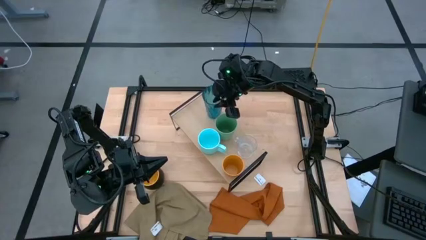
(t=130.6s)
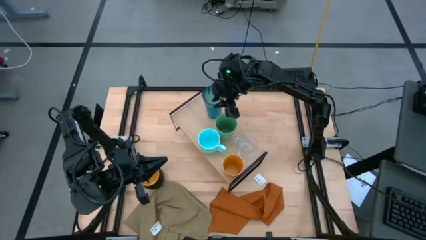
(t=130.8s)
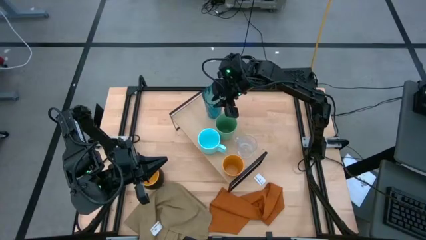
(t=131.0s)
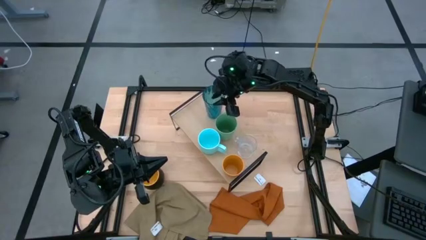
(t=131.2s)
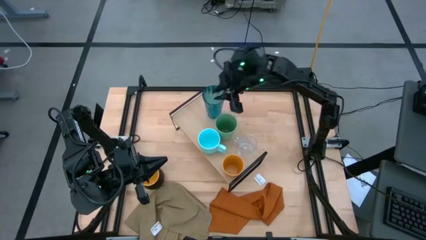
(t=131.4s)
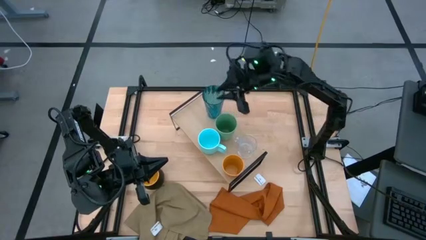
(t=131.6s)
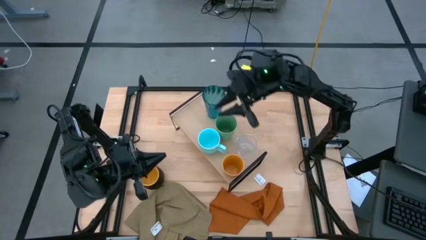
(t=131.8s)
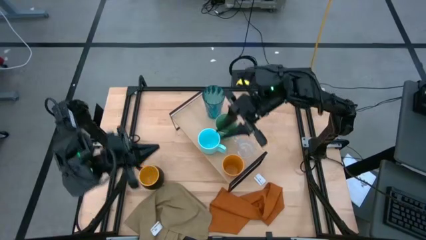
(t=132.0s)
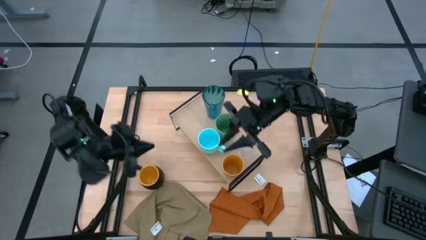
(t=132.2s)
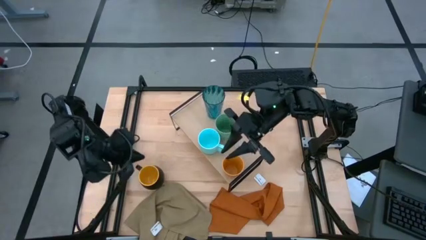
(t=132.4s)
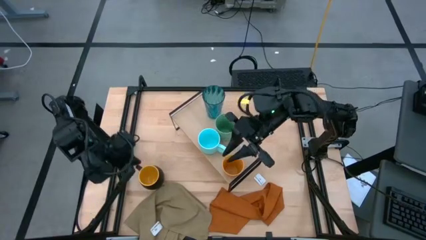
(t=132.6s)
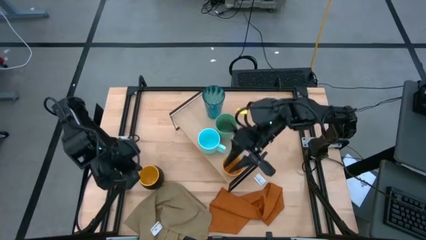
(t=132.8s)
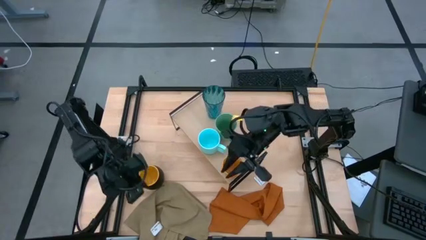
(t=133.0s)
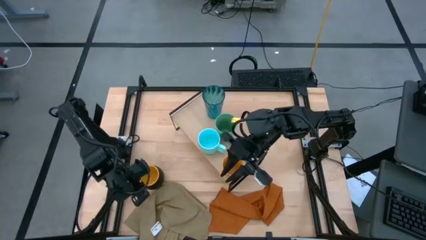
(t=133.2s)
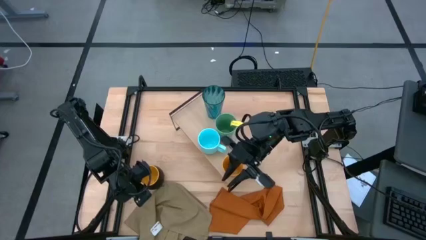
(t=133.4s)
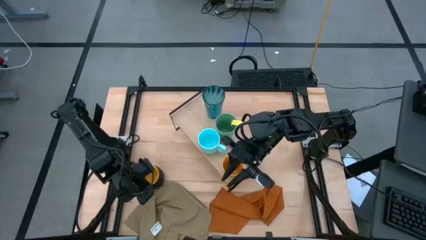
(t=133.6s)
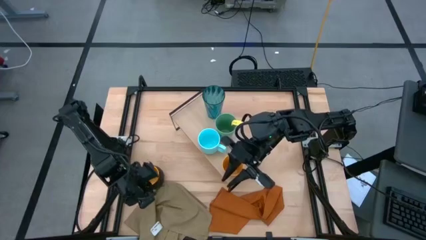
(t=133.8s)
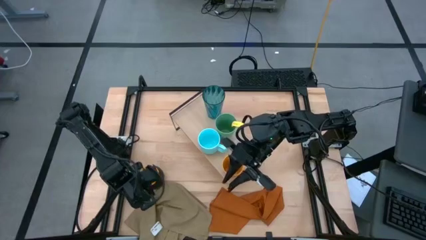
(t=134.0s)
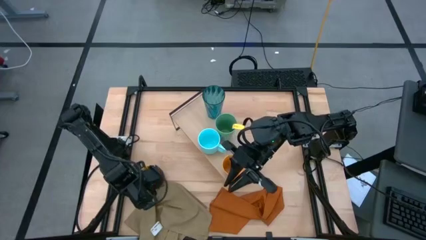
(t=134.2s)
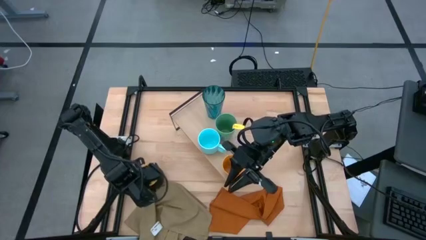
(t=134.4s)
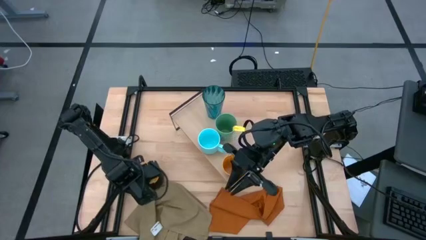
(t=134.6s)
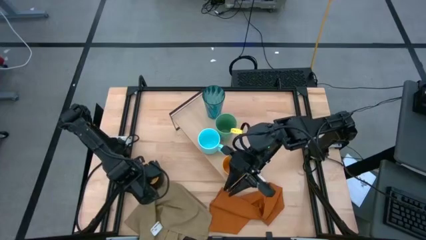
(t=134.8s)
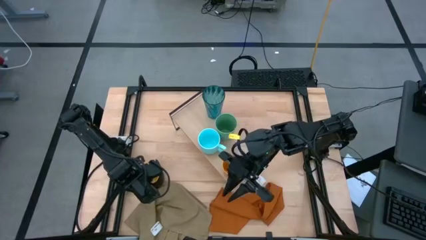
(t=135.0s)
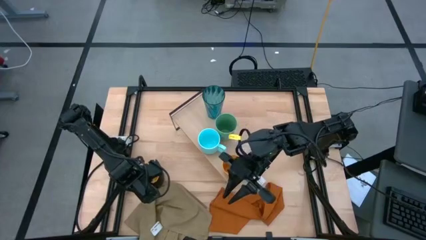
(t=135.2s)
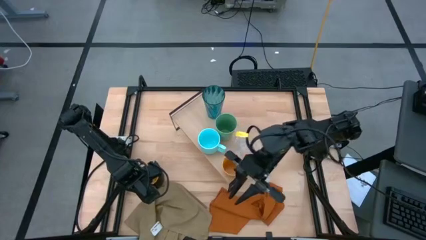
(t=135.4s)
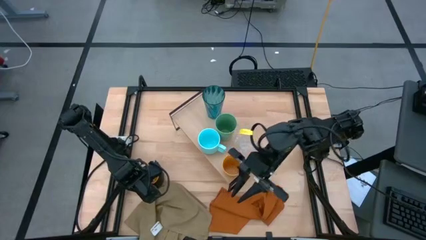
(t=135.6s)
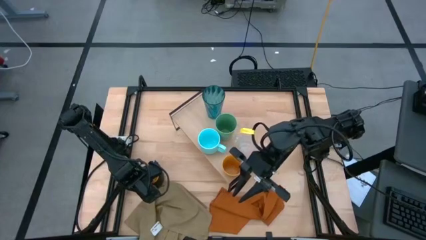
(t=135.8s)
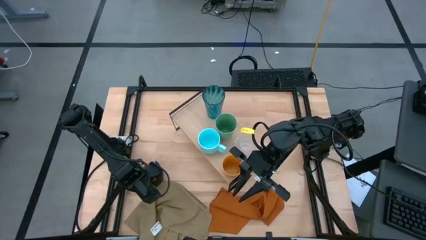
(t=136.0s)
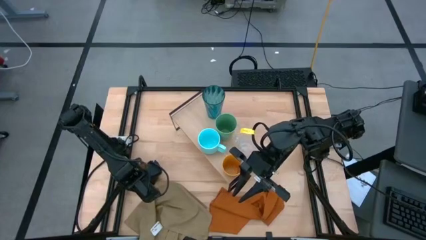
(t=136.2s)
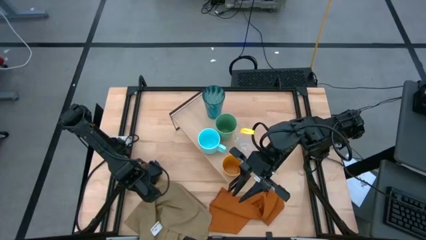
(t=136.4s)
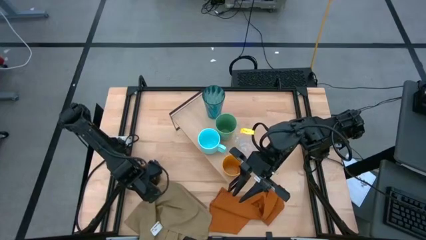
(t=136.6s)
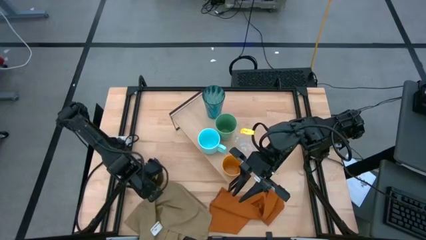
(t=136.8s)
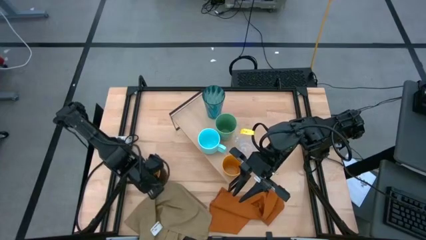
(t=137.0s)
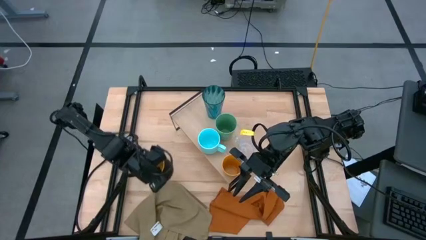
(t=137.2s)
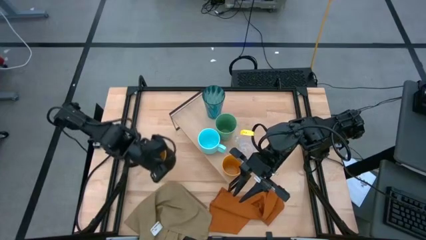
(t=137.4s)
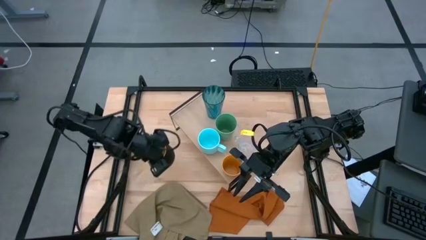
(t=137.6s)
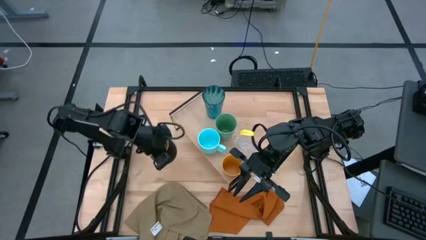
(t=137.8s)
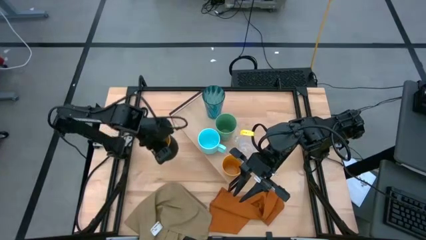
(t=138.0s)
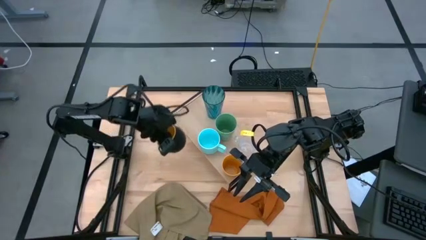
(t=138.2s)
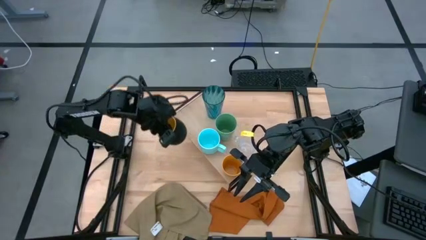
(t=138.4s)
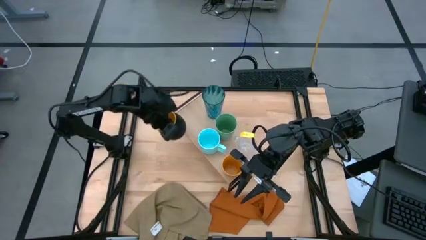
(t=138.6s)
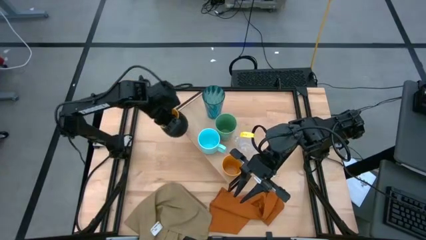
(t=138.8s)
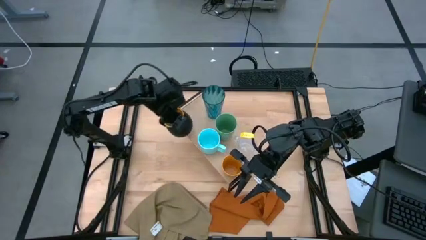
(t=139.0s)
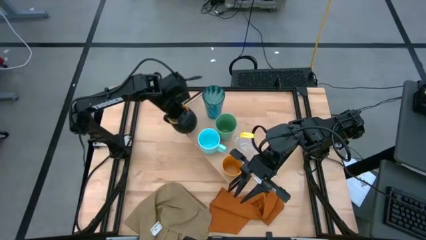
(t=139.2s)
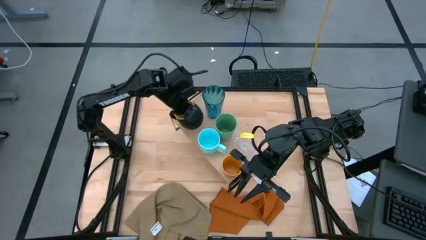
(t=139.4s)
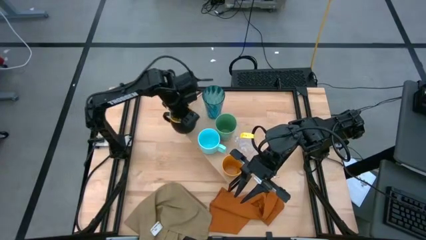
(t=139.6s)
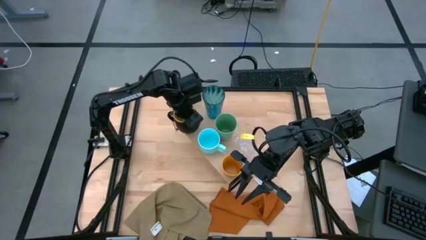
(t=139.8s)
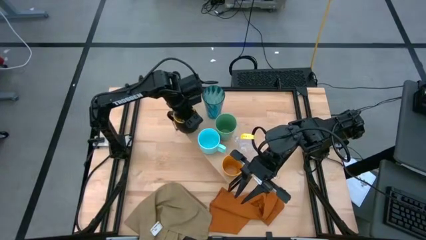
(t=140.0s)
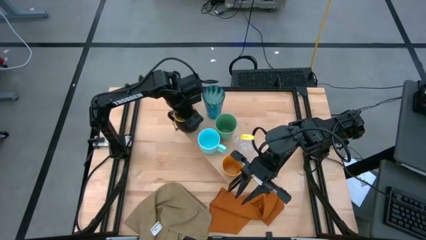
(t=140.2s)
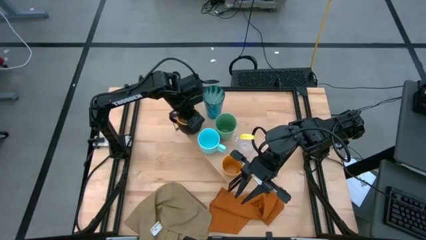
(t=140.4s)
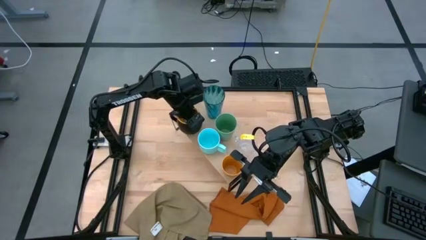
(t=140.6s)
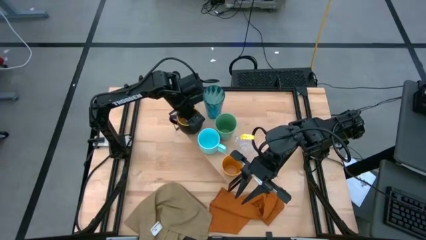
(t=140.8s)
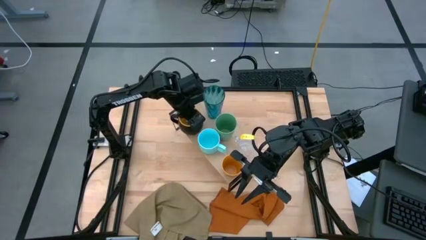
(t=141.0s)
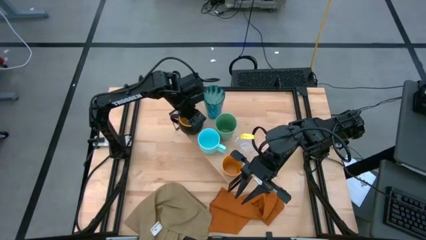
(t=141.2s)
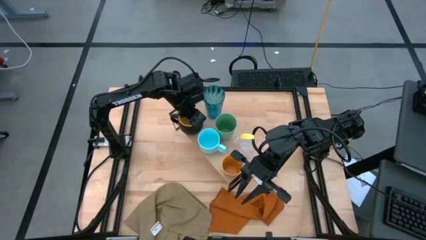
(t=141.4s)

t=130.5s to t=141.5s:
Task: Stack small to large cups/mugs on shelf
Put the black cup on the shelf

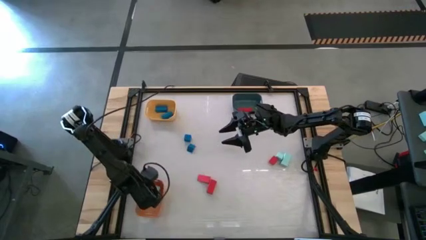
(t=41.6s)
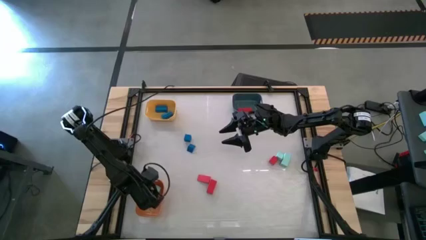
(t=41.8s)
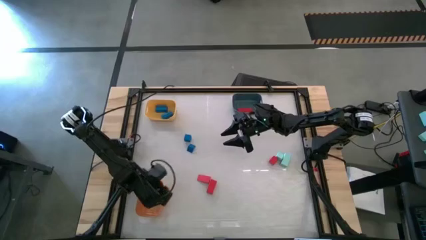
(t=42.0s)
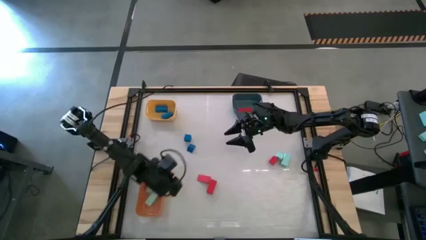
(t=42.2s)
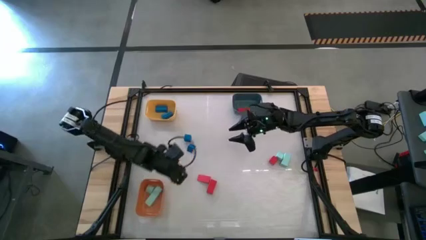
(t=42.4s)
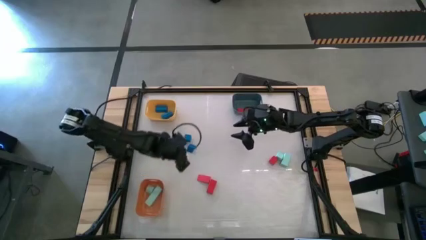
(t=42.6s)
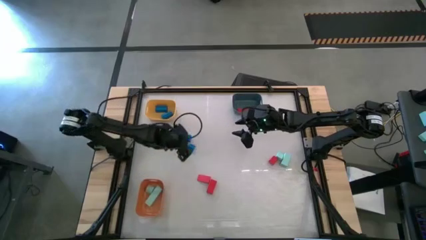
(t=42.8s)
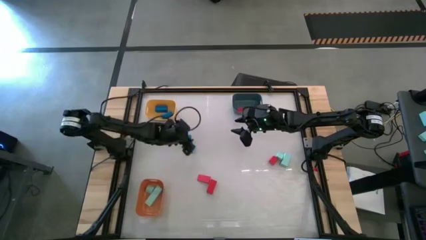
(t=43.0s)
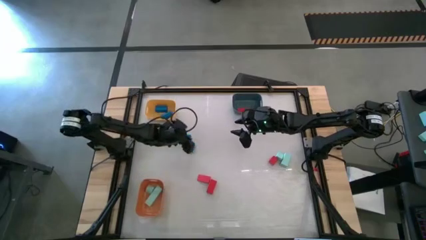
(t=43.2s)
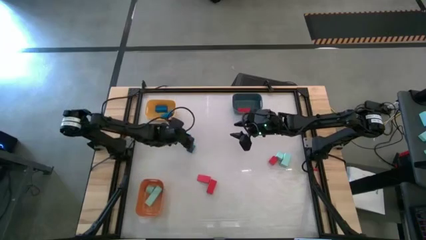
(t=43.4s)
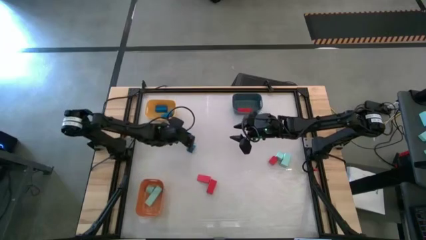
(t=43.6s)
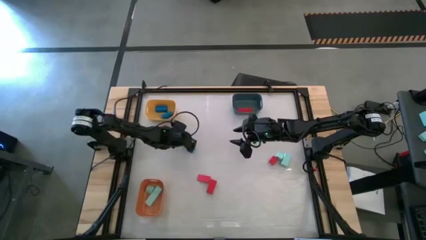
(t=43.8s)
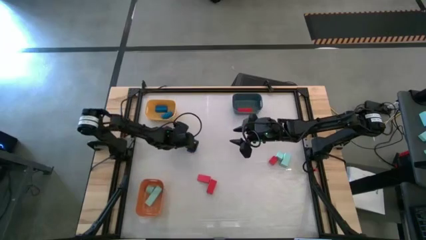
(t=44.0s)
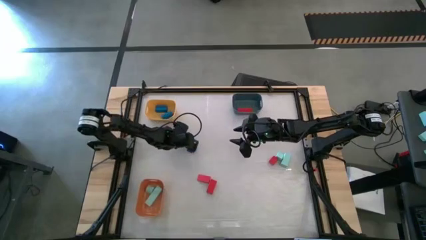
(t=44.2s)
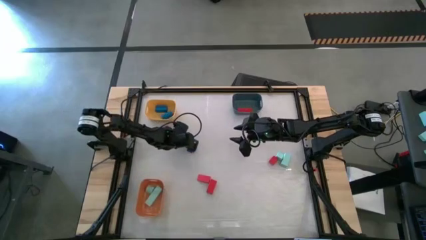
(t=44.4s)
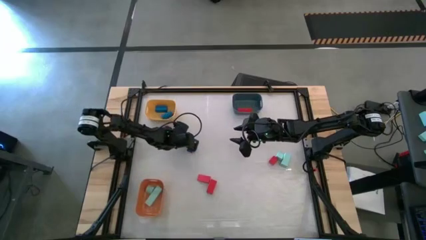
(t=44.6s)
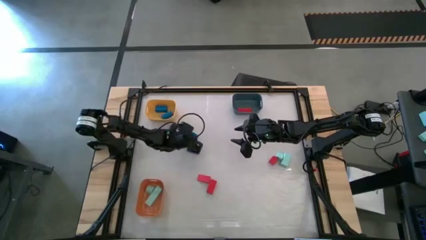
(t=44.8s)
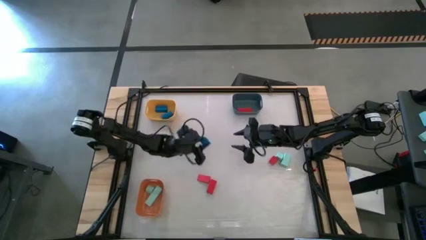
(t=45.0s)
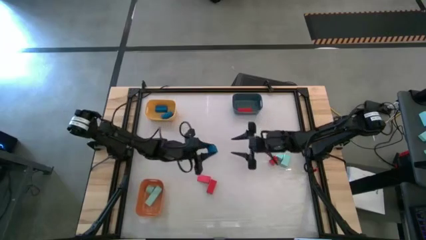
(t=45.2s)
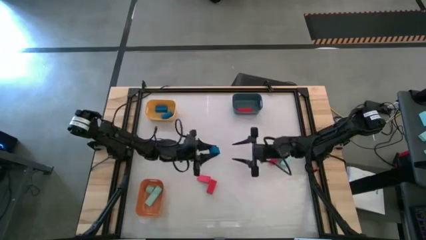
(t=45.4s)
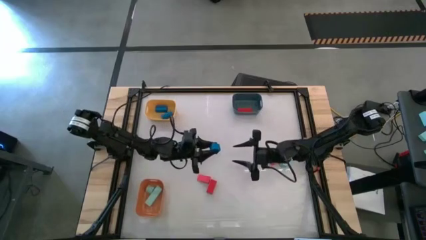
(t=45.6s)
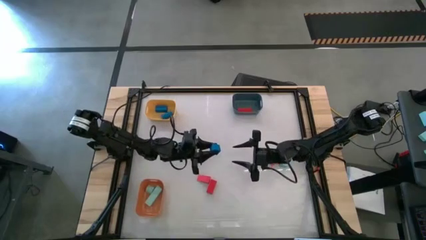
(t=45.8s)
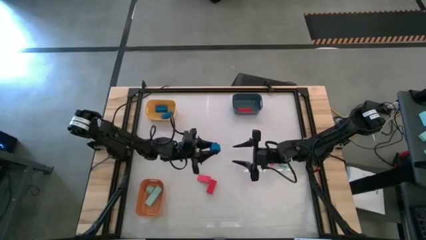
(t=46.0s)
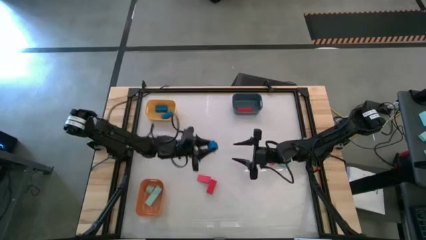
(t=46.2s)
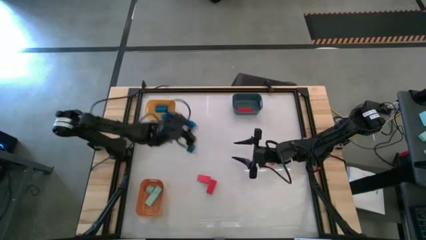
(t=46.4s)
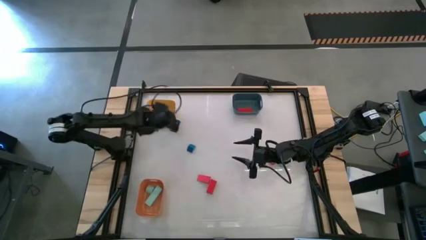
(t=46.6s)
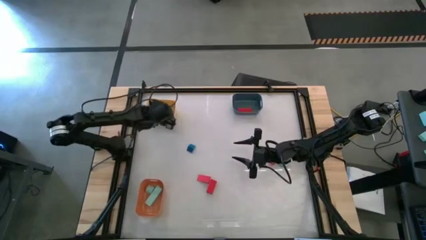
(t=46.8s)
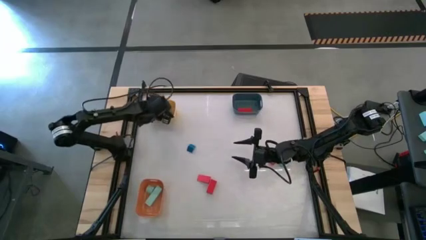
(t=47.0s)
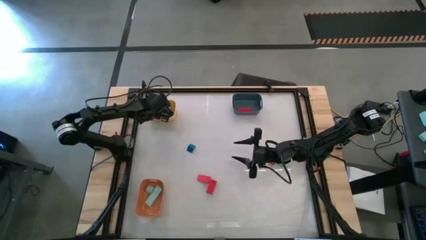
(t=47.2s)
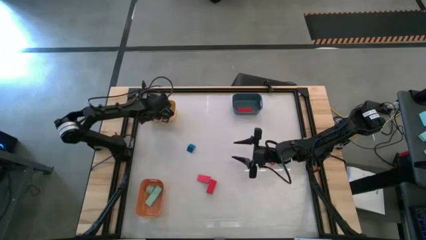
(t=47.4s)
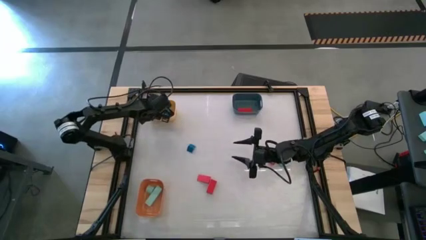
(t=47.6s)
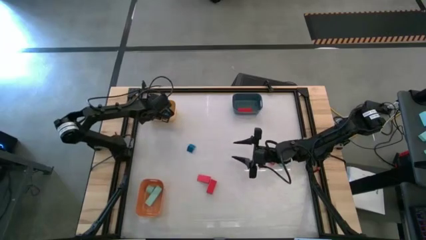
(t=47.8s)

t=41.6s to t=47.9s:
Task: Sort & place blocks by color
Put the top blue block into the yellow bin
